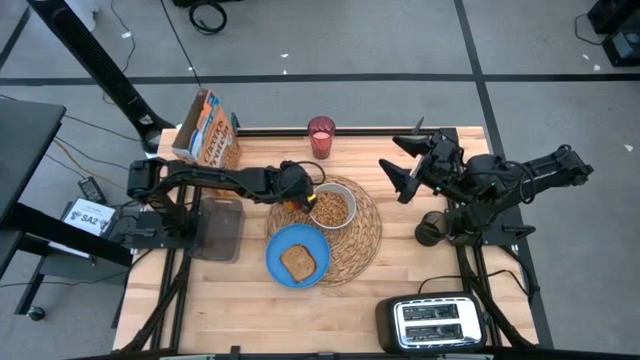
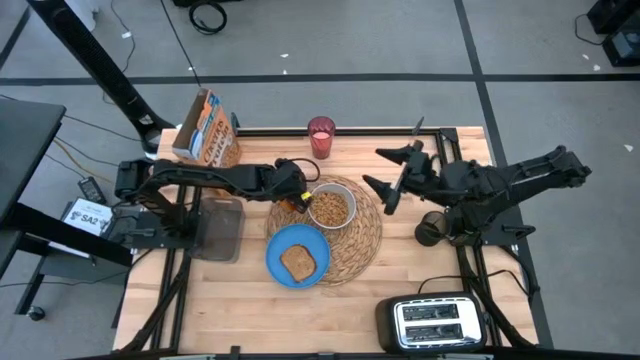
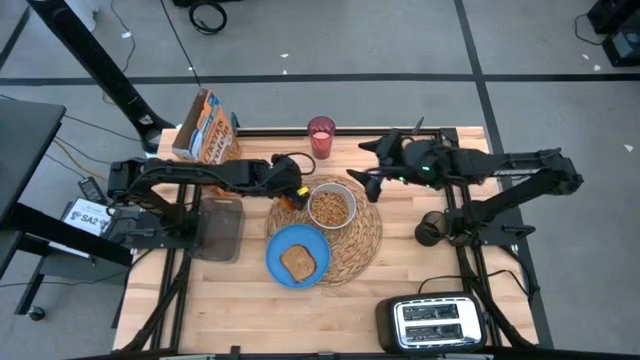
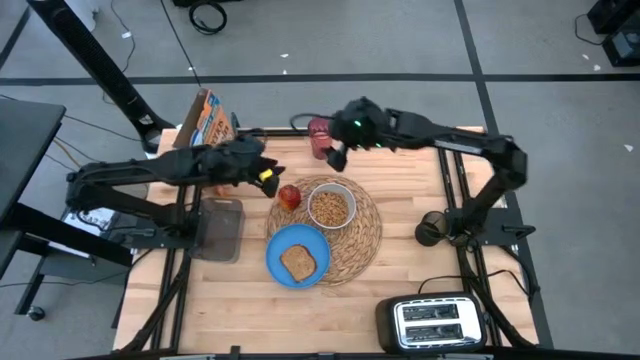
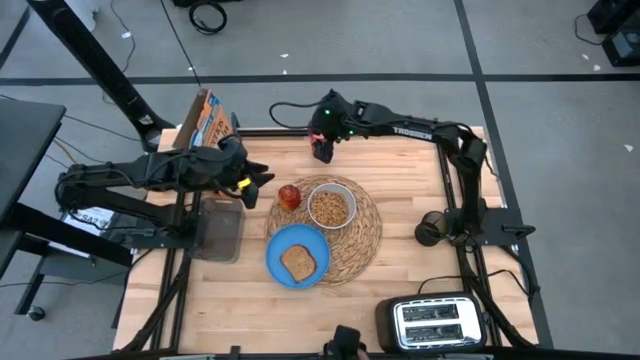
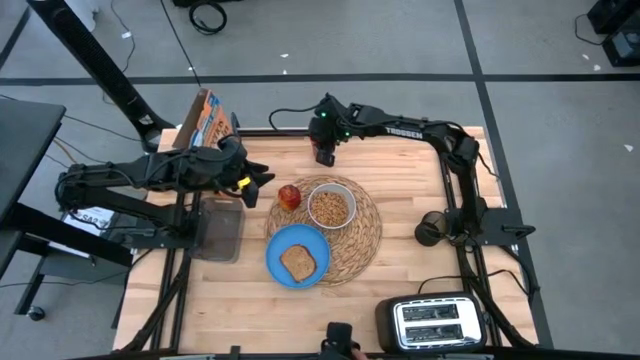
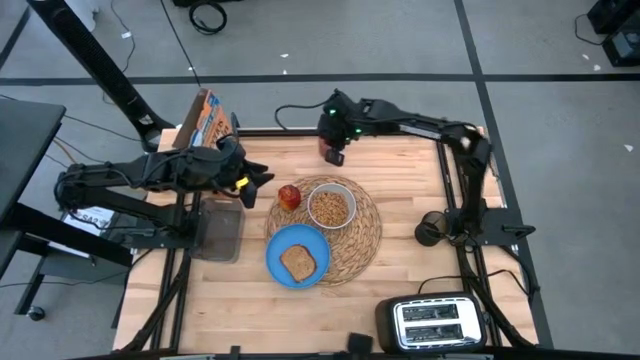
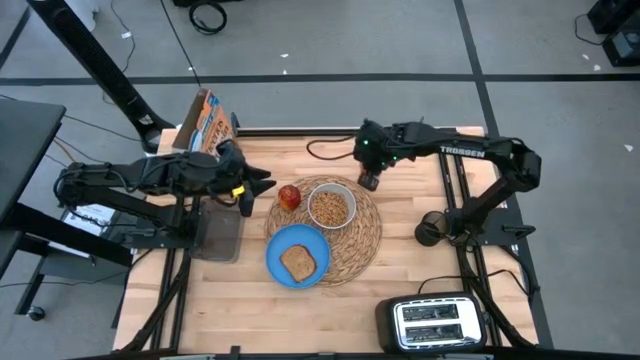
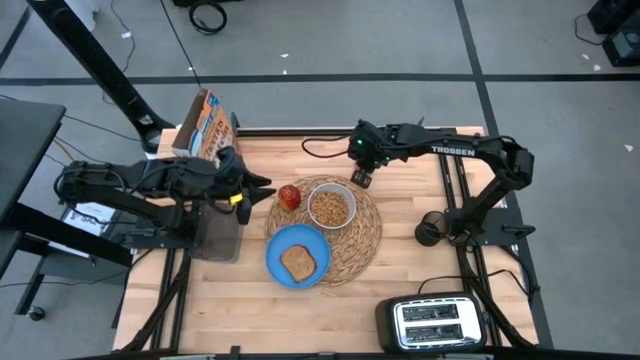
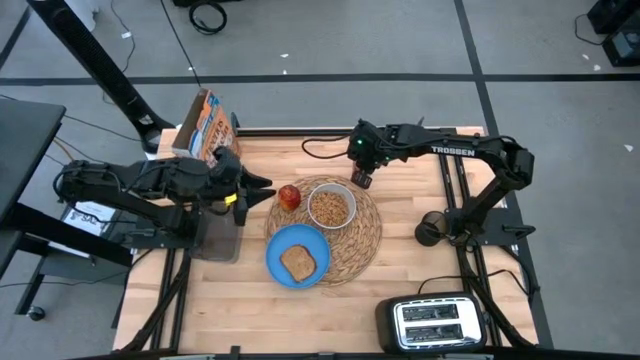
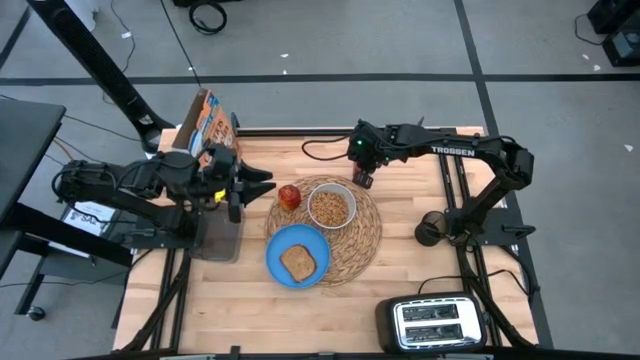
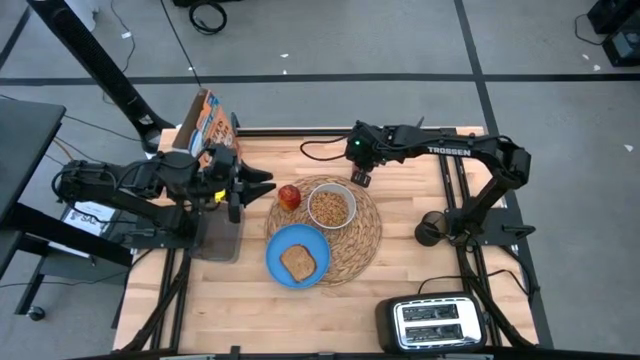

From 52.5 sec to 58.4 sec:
Task: Arrange a breakfast setting
Put the glass of milk on the top right of the woven placemat

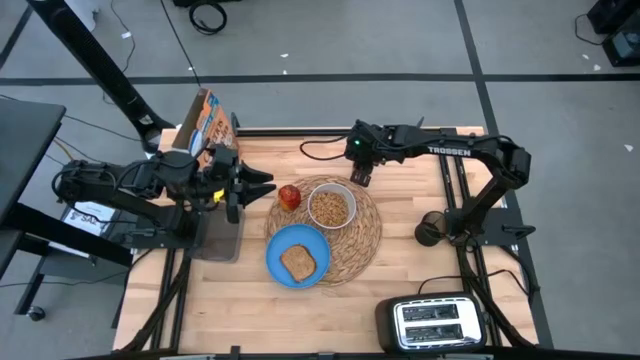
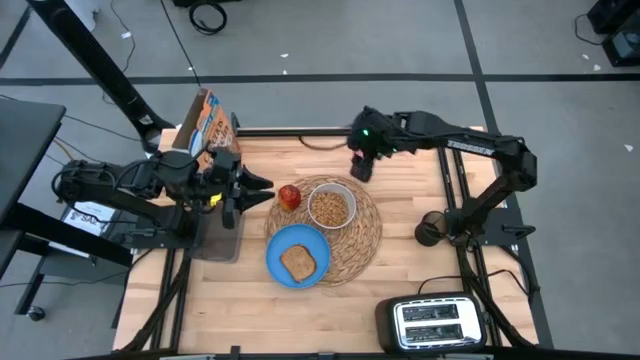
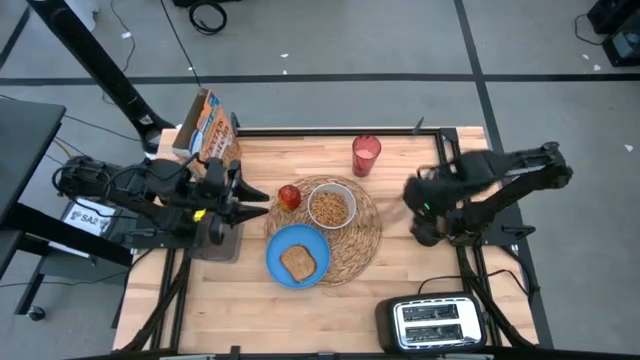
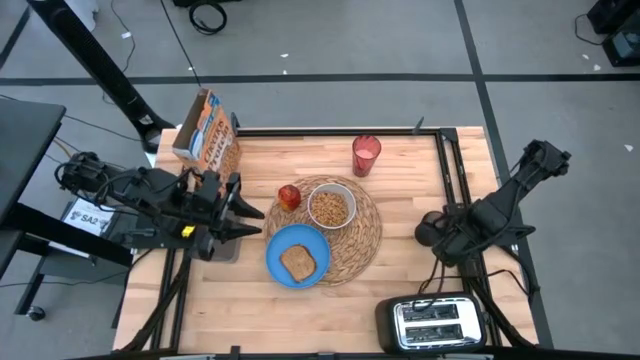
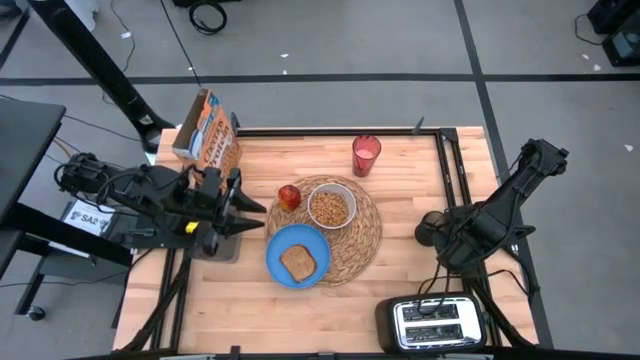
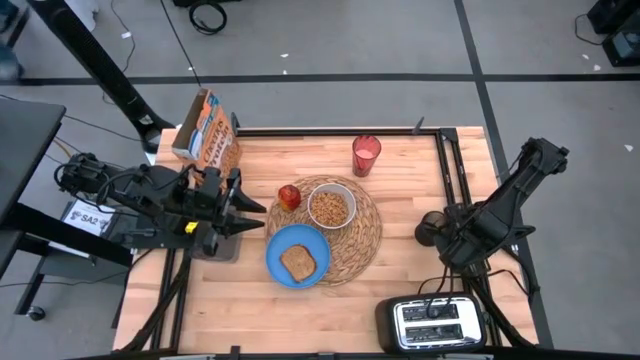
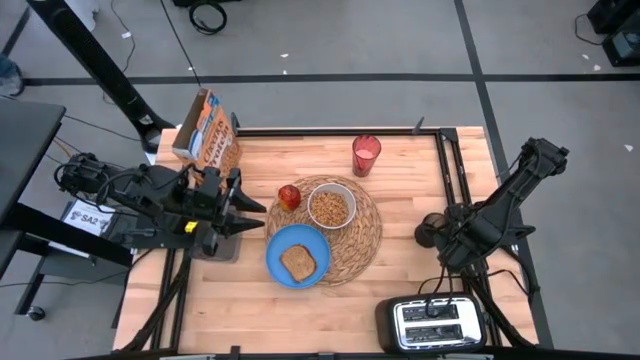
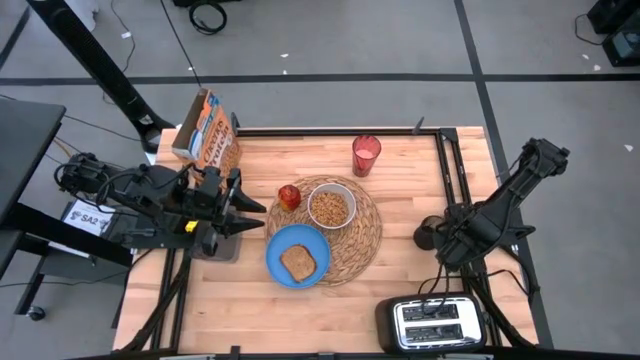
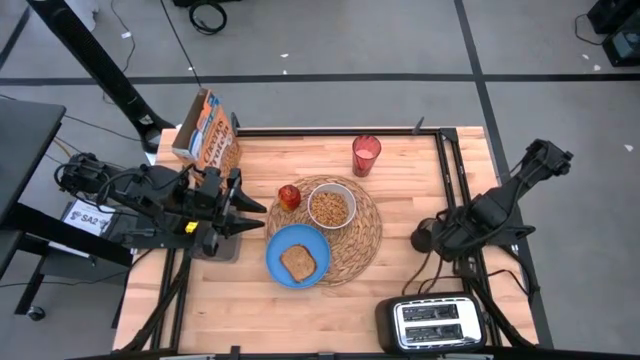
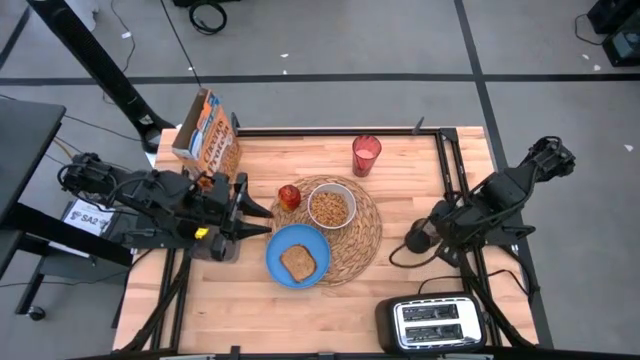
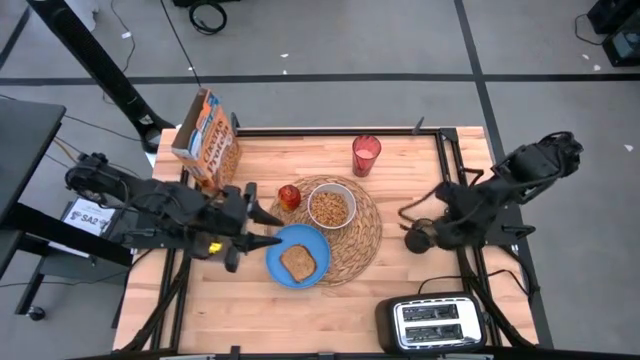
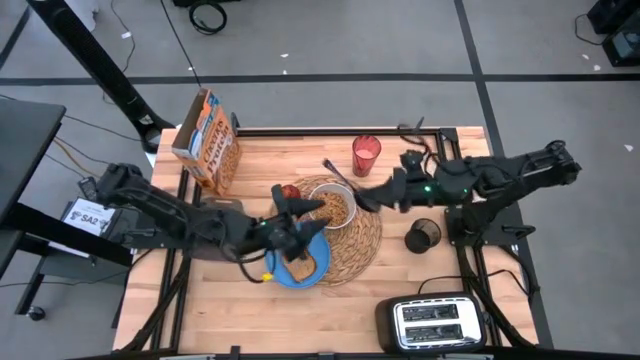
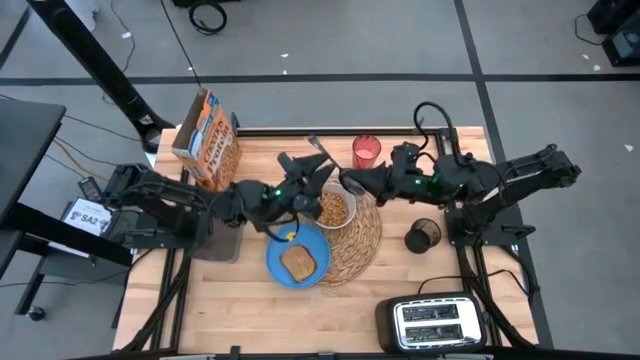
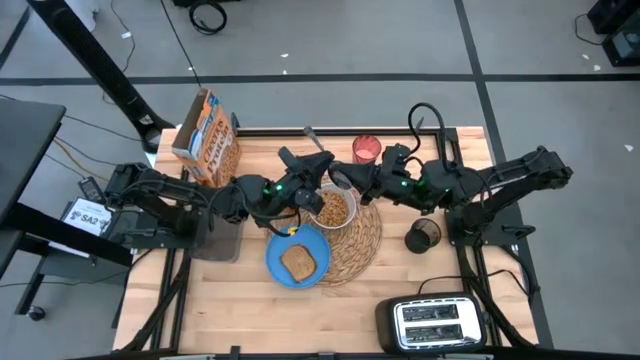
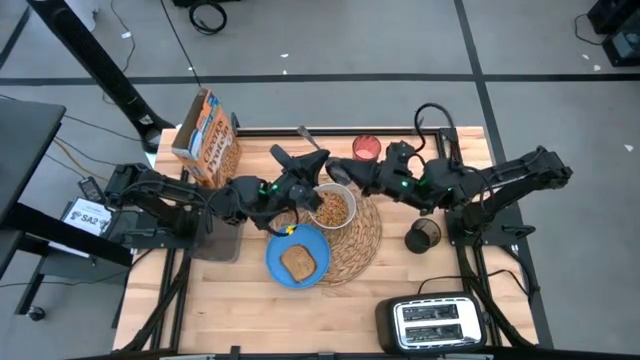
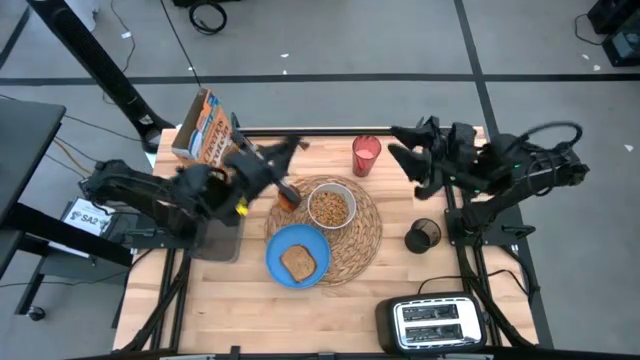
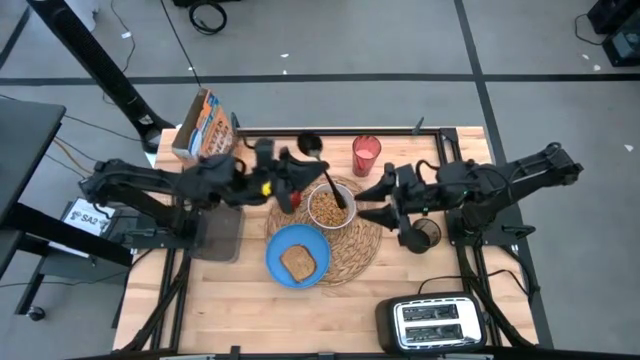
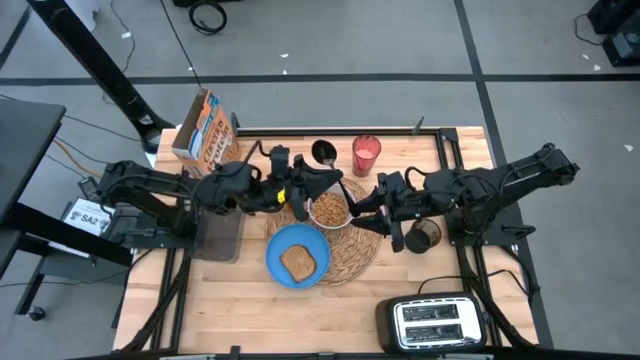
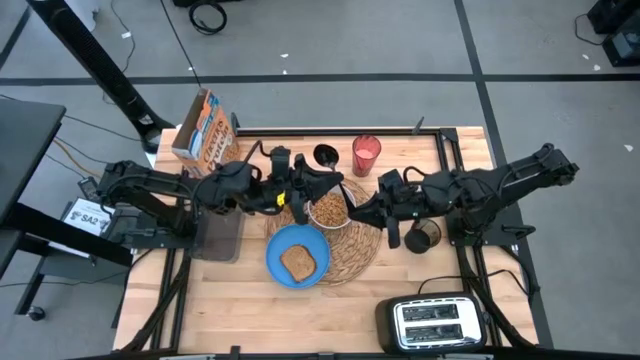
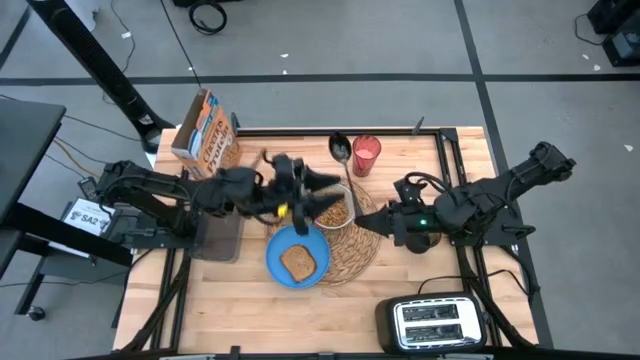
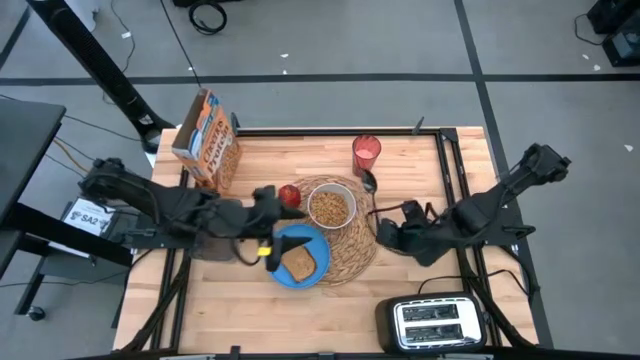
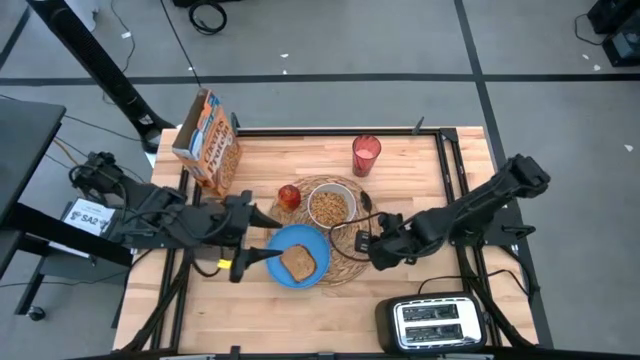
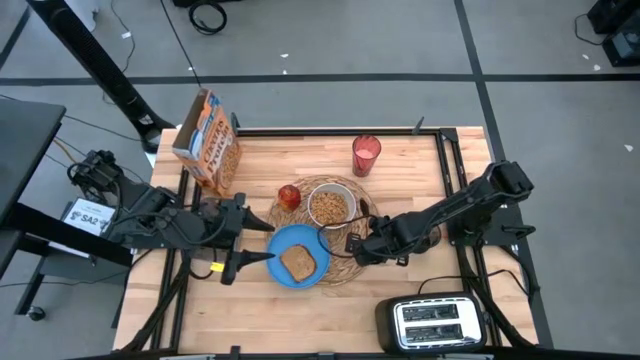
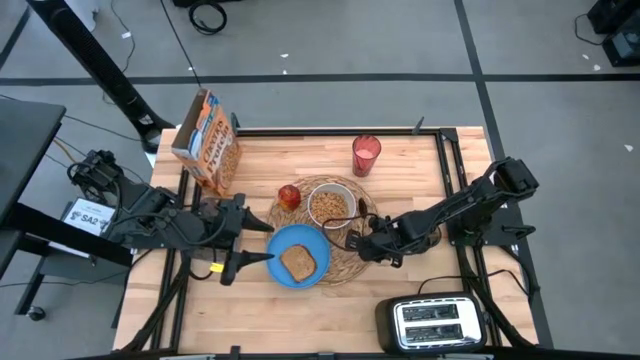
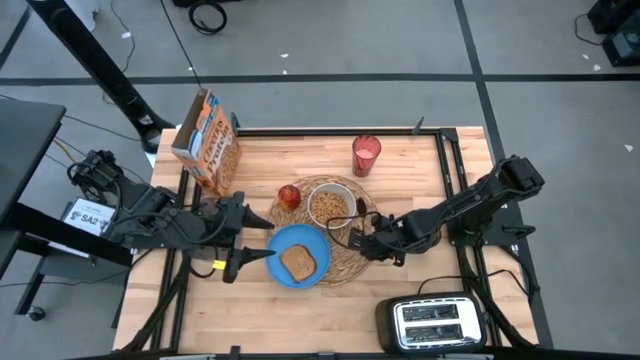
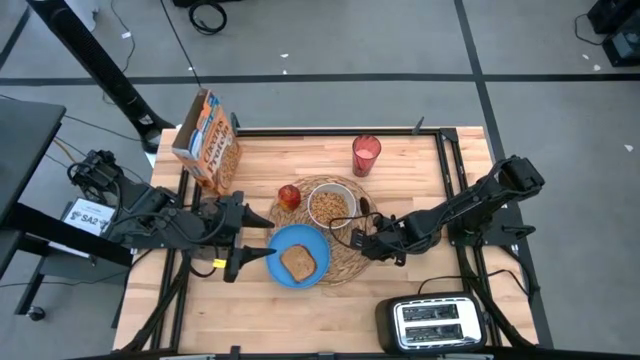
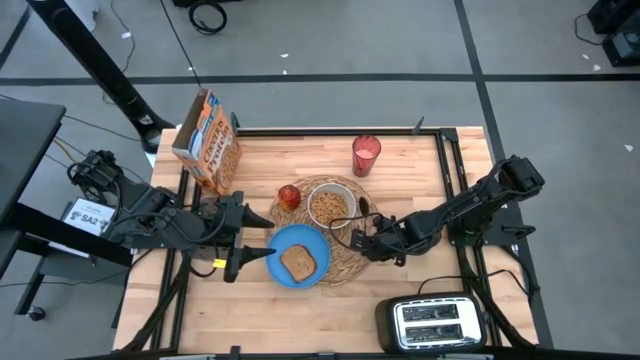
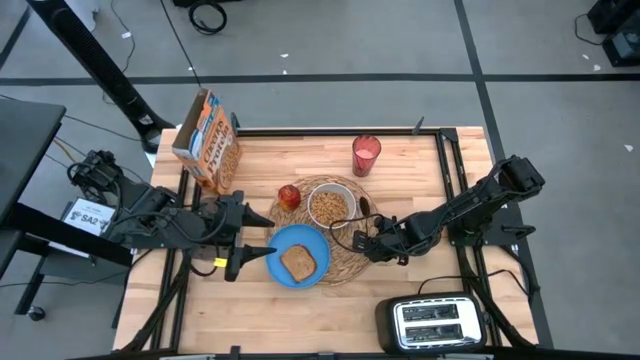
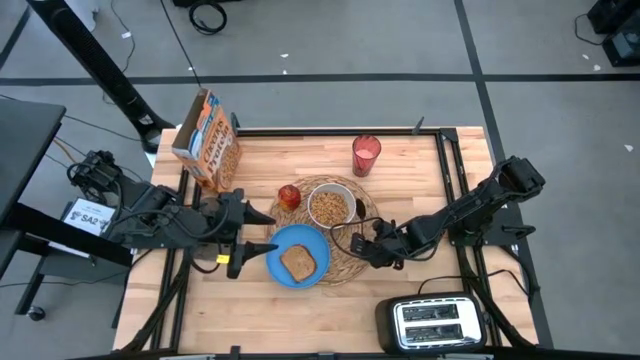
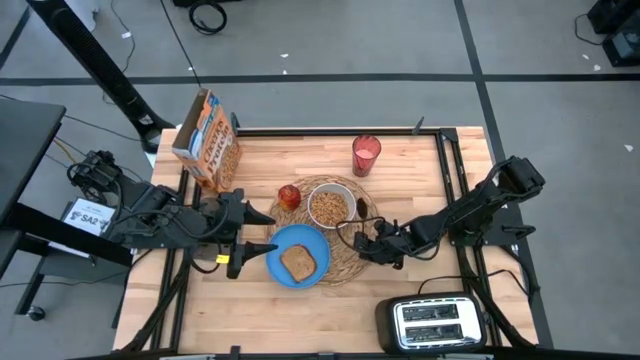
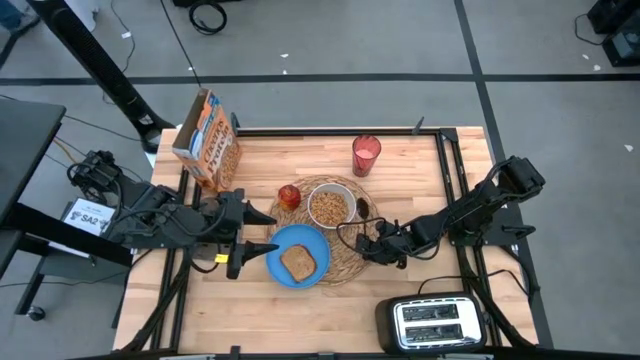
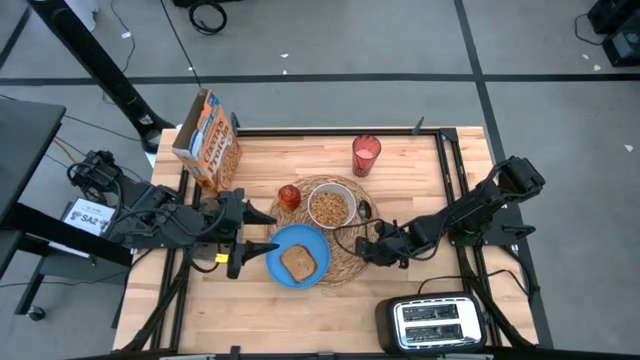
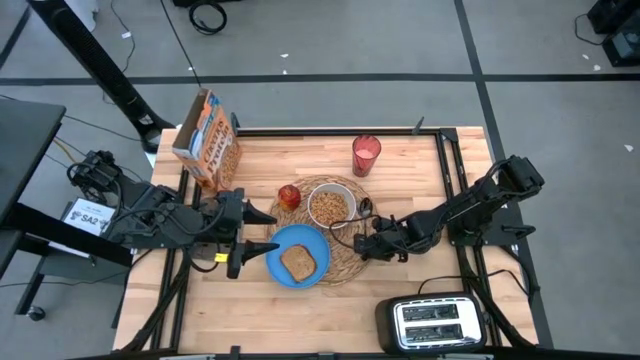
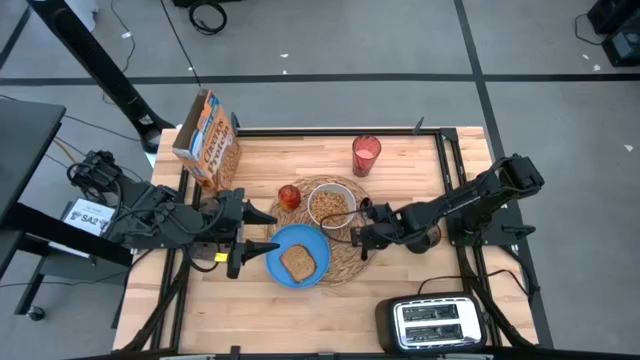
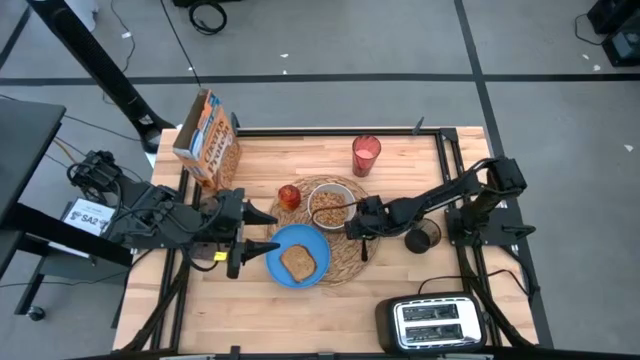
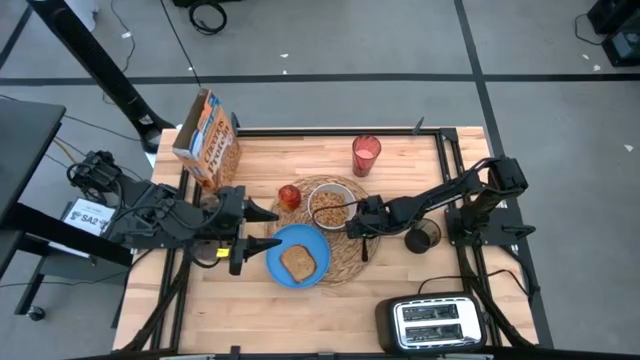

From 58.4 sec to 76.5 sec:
Put the spoon on the woven placemat to the right of the bowl
